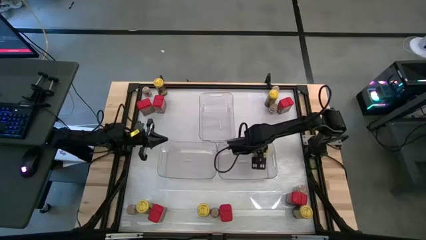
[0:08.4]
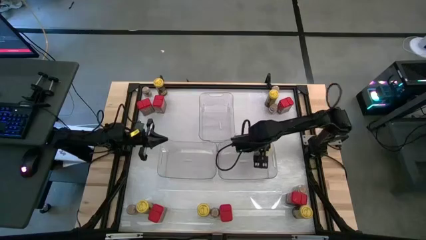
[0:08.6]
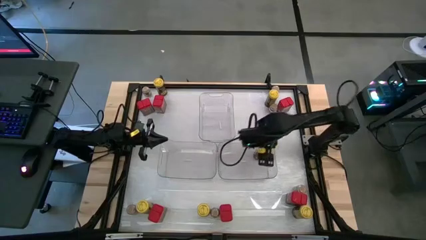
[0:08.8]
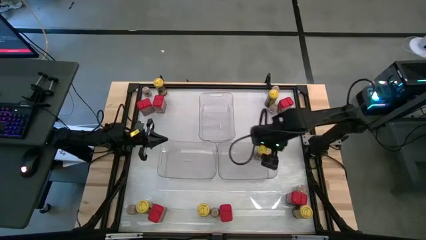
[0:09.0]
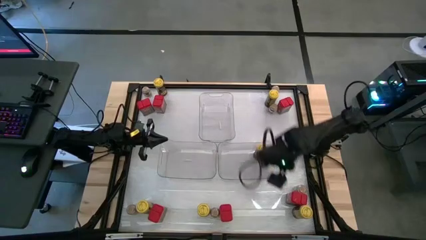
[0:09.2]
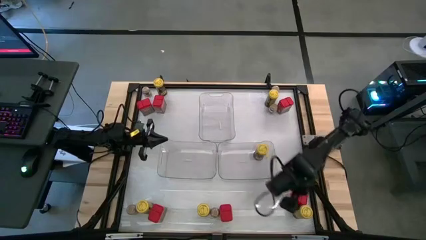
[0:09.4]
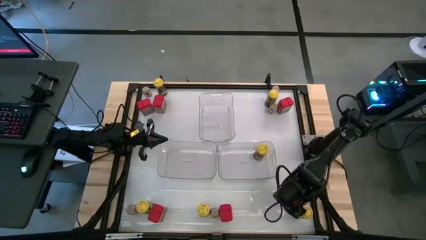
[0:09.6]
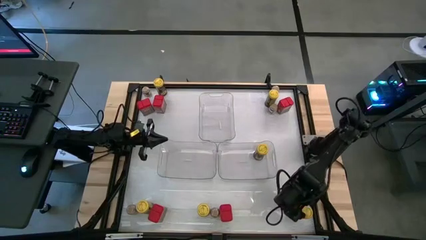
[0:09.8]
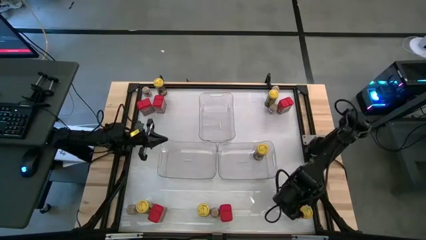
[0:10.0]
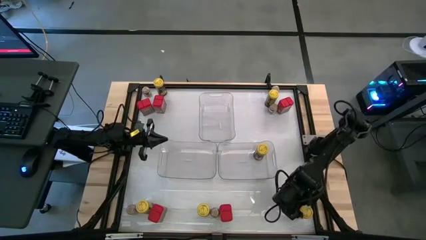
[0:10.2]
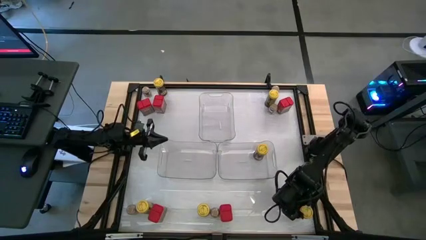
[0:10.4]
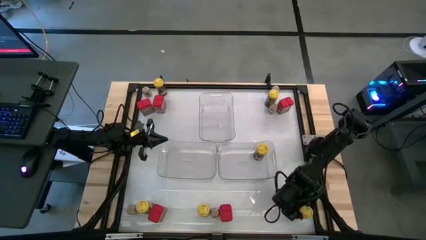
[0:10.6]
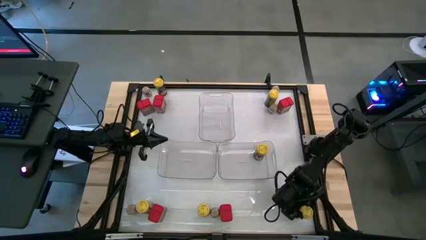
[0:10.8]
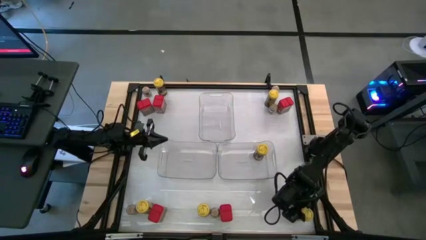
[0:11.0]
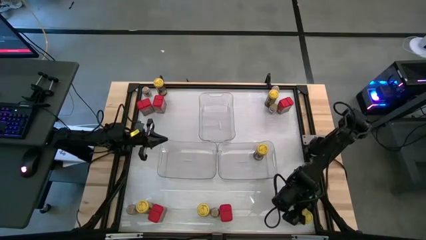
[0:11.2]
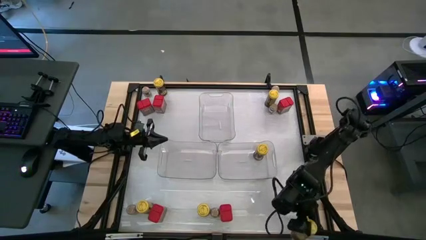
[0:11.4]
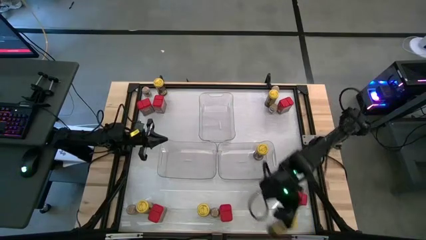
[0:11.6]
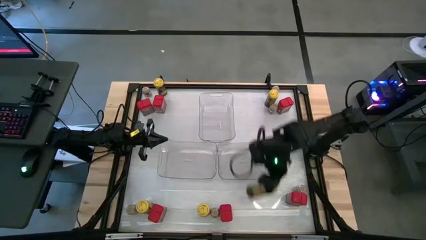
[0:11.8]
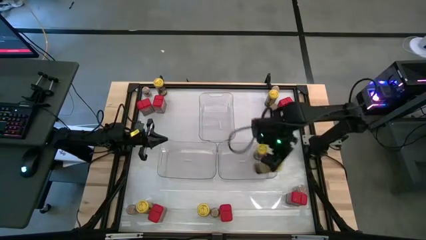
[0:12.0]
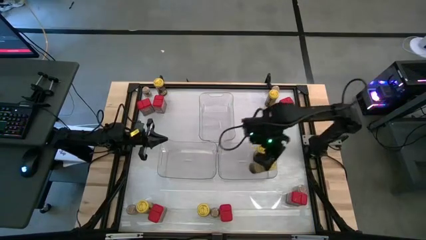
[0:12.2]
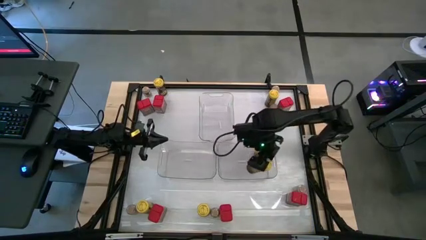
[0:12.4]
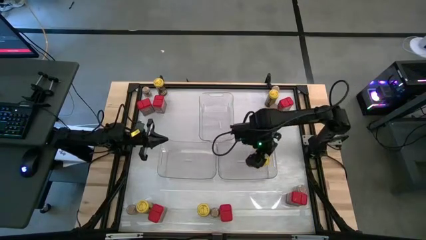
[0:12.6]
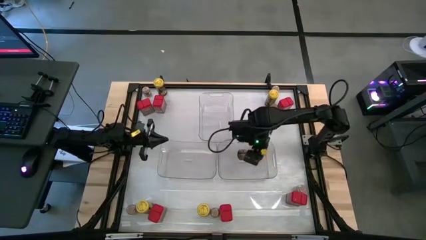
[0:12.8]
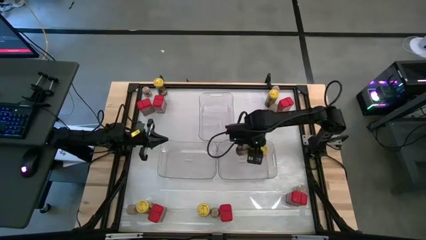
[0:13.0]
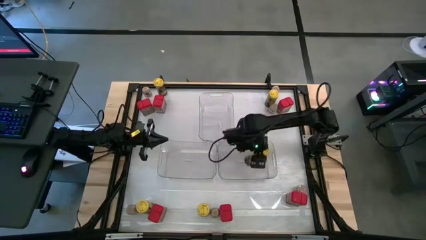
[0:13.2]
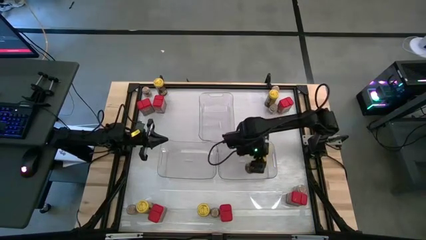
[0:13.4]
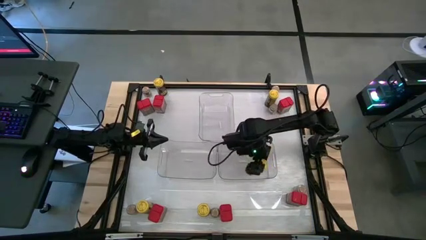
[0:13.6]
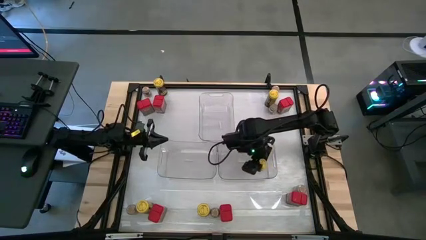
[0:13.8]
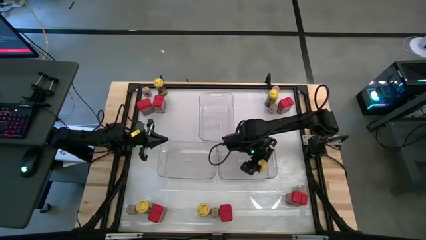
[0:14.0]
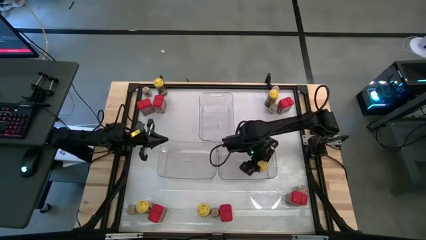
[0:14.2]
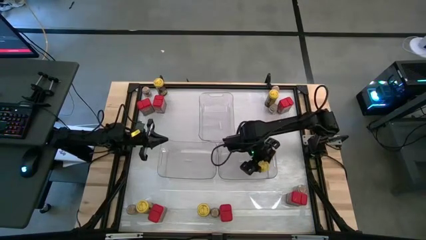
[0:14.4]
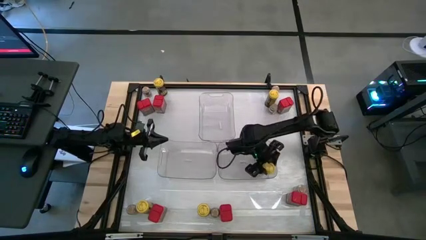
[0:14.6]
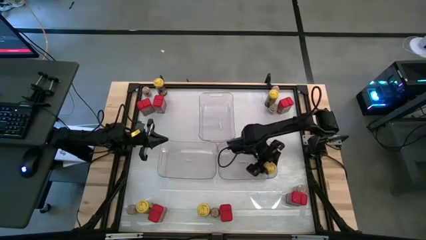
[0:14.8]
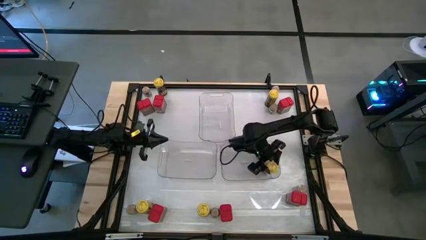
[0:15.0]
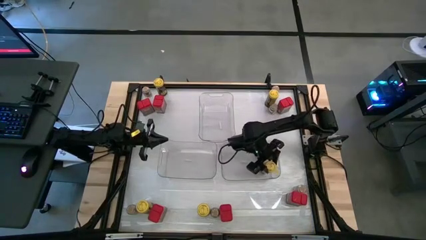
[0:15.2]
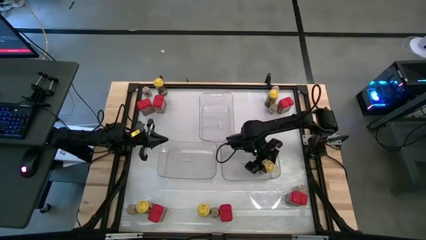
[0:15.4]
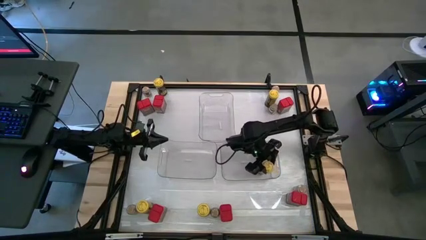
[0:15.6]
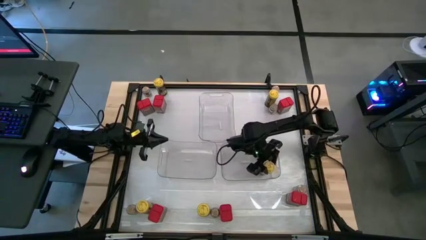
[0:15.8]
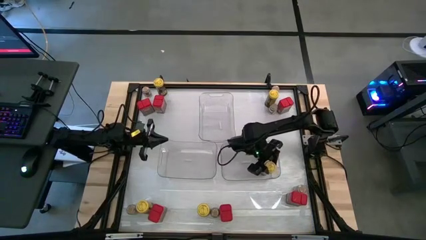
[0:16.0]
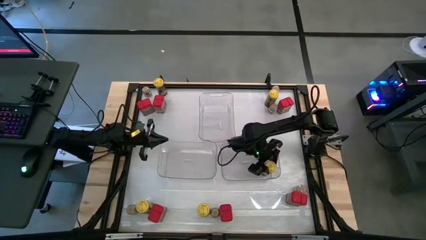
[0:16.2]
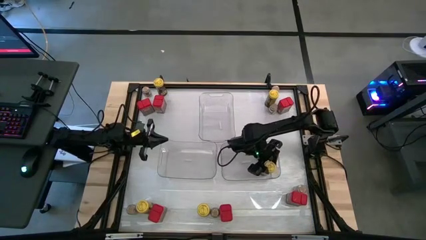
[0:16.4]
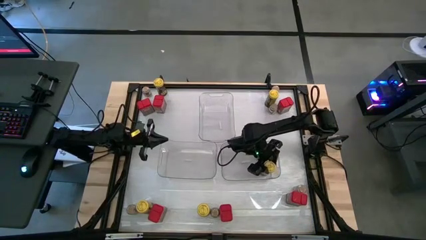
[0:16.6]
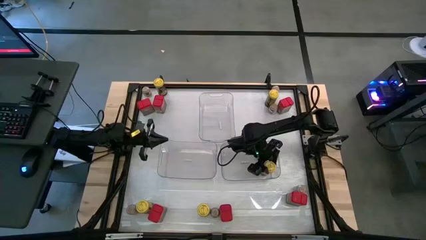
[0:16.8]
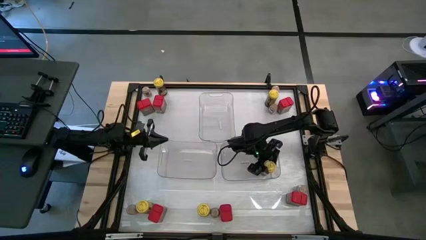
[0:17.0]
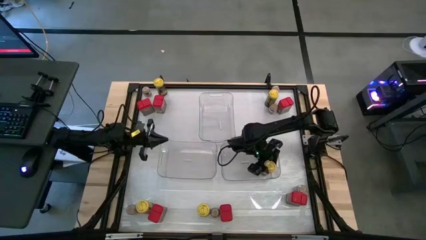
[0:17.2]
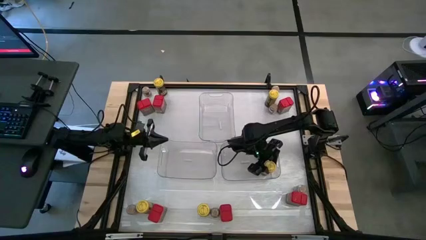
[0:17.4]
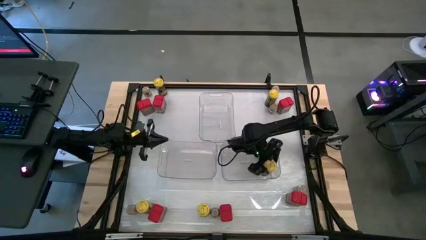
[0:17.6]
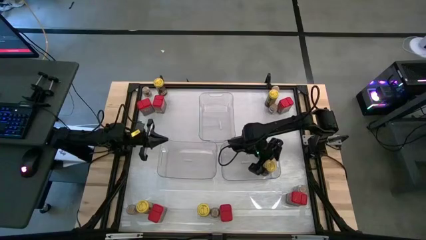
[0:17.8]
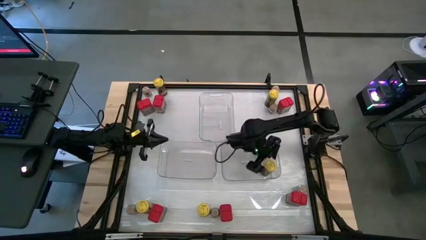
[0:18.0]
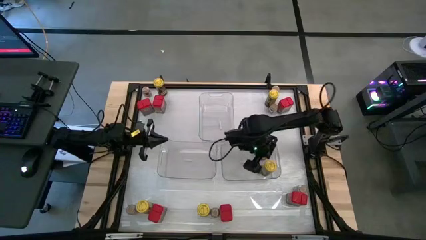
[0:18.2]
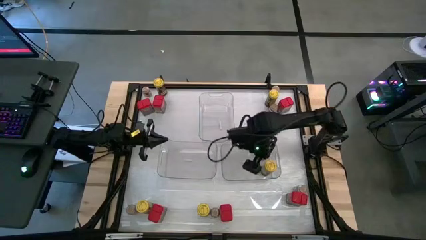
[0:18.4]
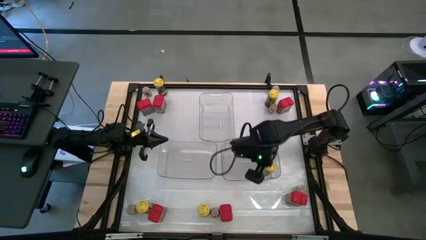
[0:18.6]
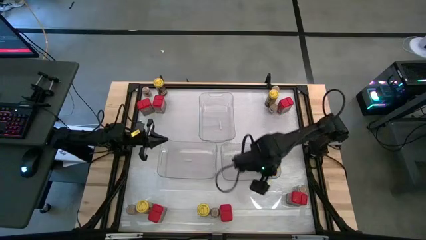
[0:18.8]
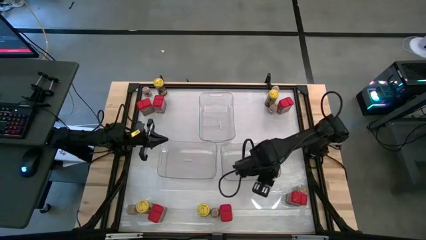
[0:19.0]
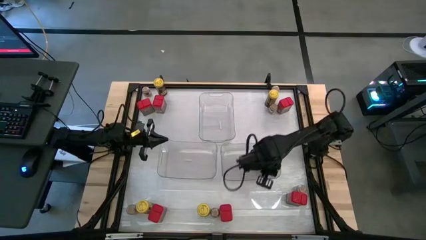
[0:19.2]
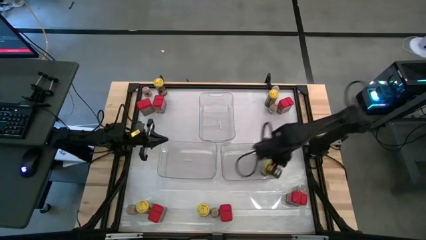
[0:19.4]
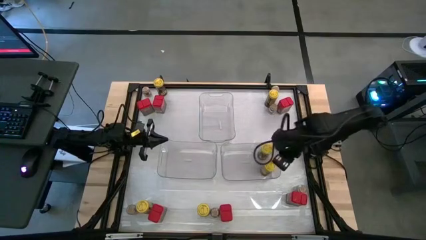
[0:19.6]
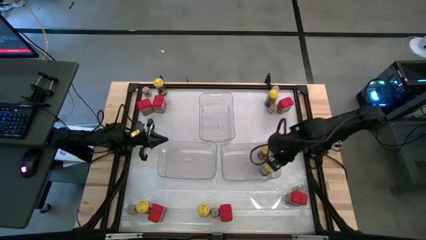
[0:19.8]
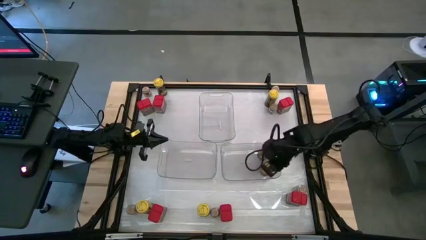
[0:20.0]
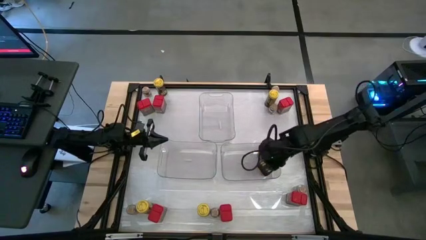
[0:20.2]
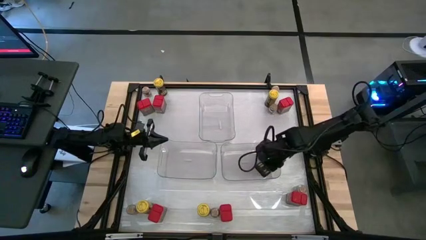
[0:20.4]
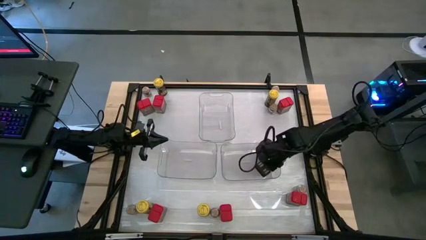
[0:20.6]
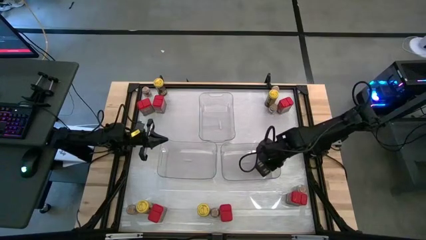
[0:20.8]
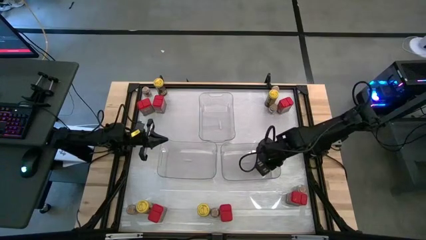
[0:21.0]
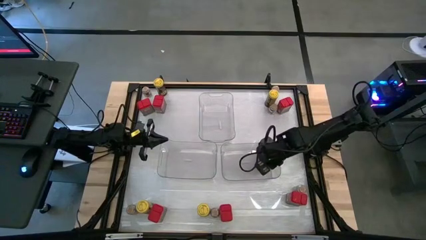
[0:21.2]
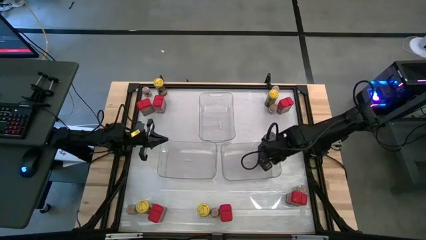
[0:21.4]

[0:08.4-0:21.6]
Task: Sort spices by type
Put the yellow seasoning bottle into the bottom right transparent bin

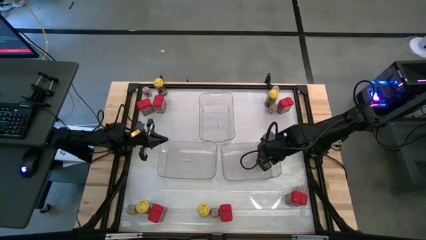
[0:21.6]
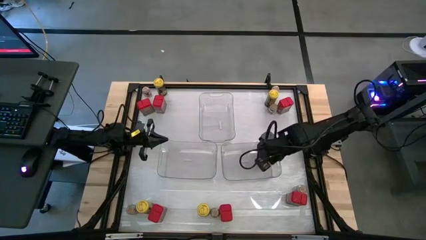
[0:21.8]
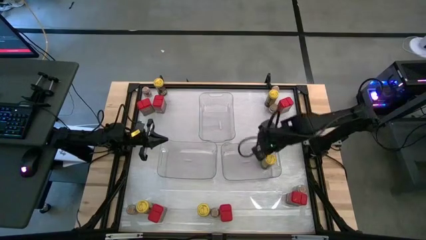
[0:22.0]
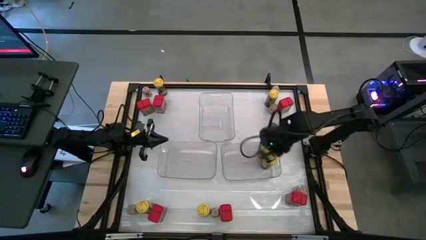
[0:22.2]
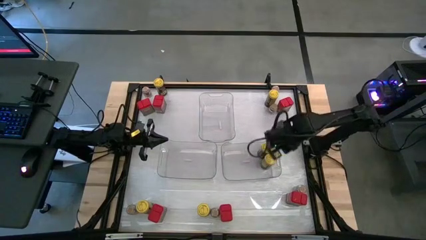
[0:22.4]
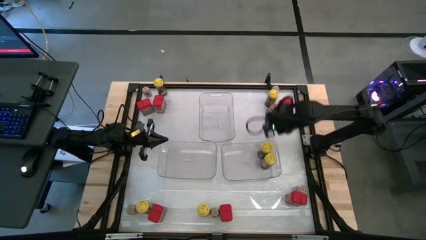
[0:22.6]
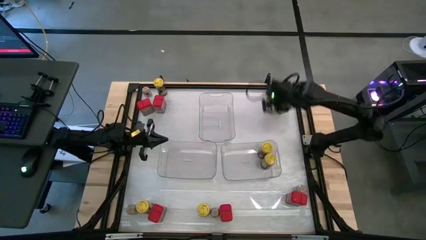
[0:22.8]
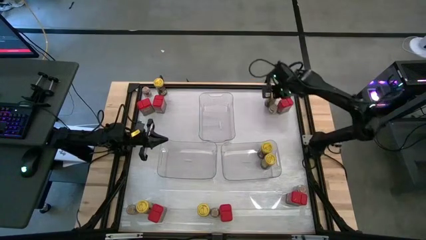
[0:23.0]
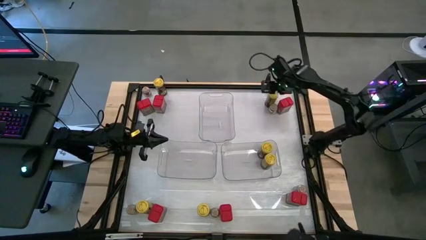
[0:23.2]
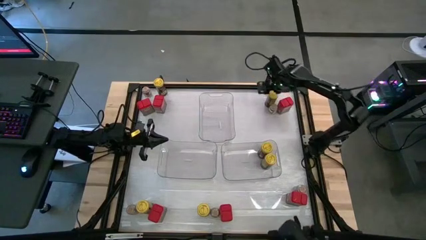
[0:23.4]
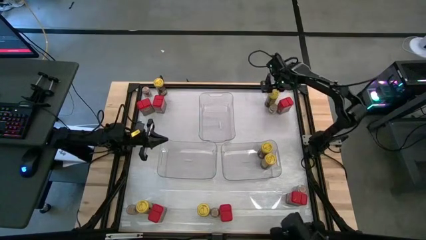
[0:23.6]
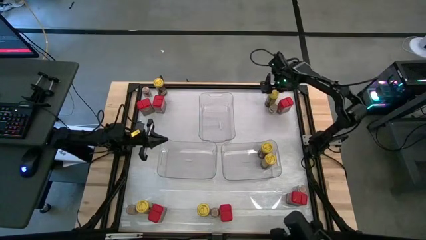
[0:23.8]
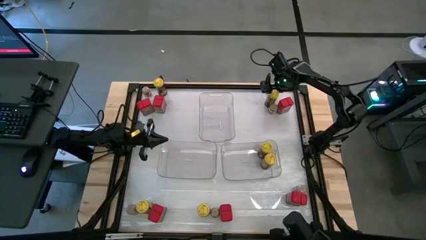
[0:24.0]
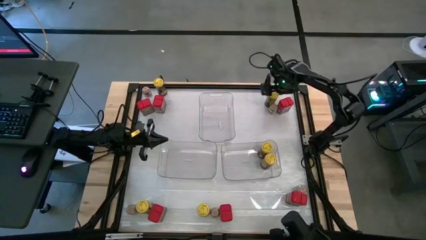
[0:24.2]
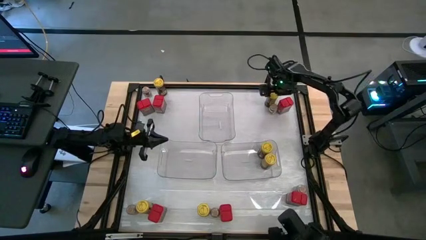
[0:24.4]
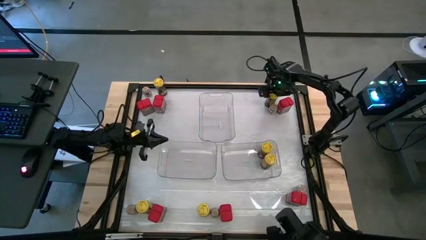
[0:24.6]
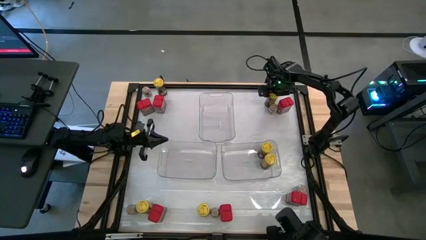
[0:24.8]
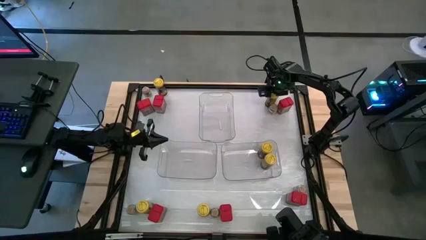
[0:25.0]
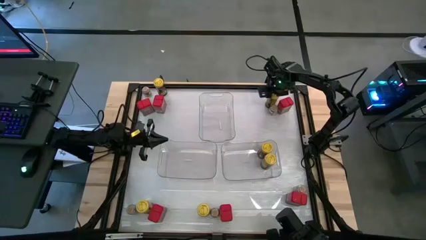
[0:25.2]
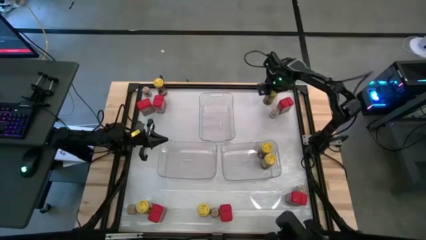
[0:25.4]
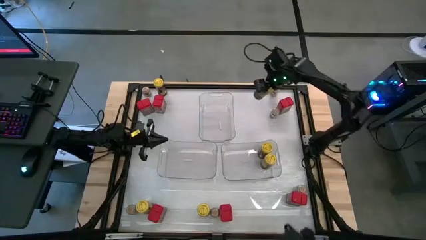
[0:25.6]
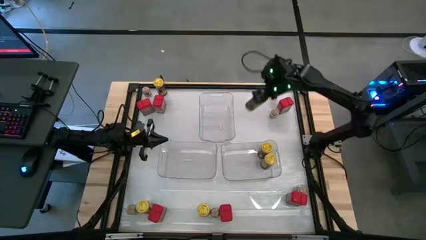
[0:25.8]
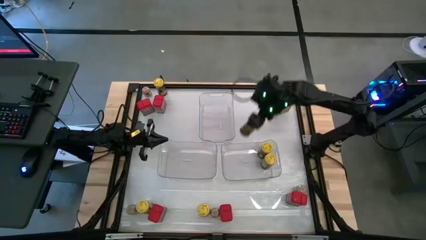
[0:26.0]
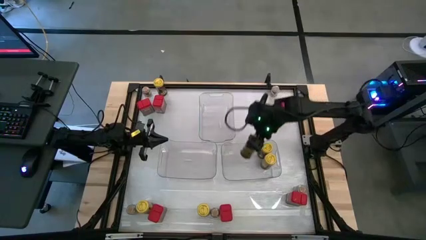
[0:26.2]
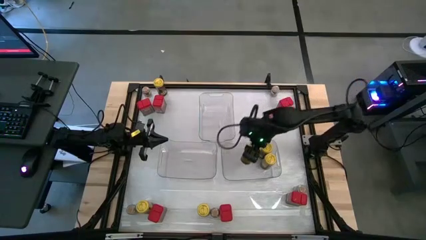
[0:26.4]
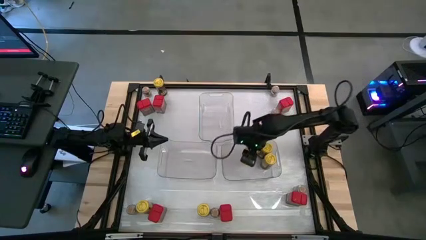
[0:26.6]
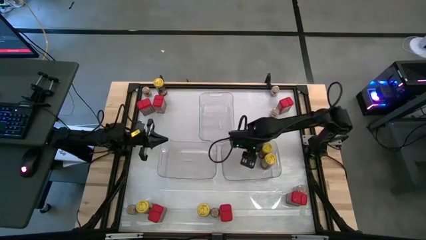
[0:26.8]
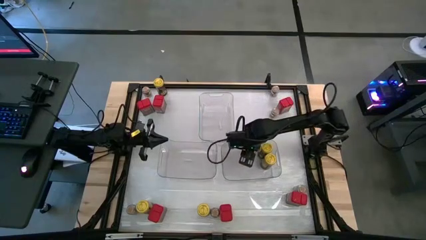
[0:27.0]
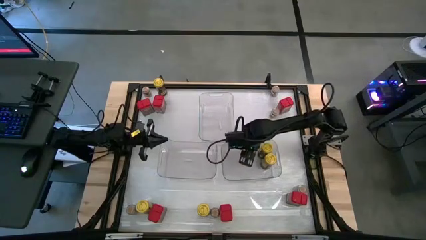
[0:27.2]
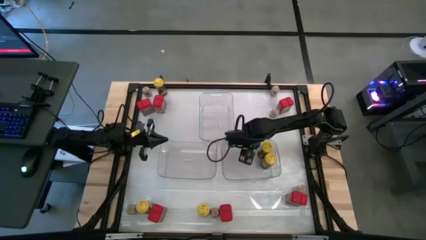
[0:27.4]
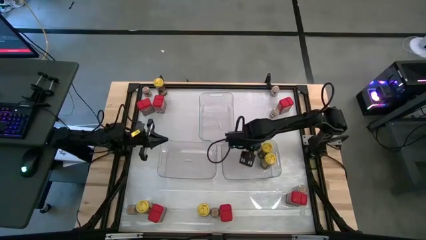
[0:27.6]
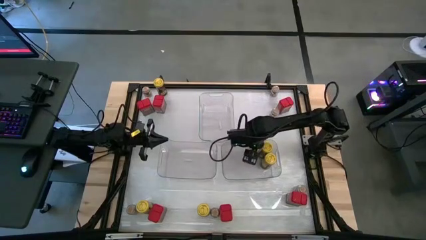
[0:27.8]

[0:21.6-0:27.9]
Put the yellow seasoning bottle into the bottom right transparent bin
